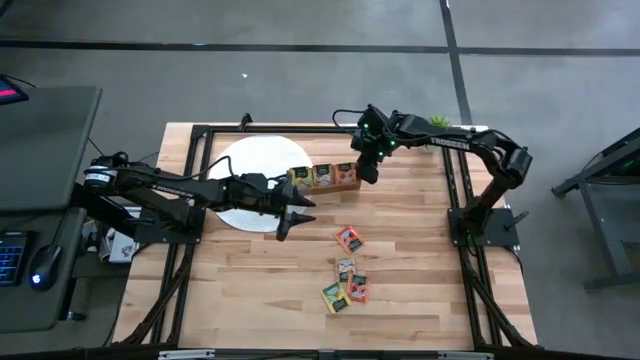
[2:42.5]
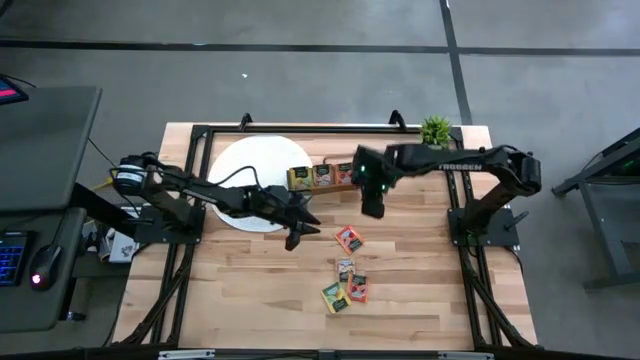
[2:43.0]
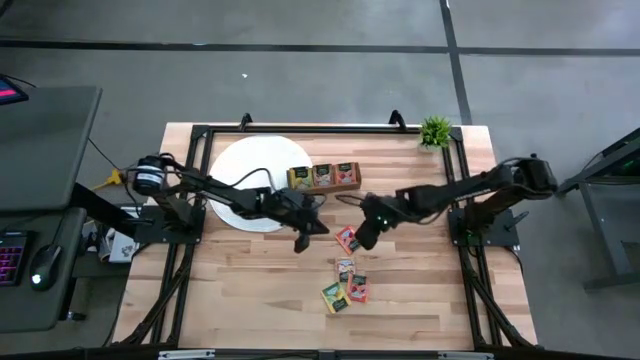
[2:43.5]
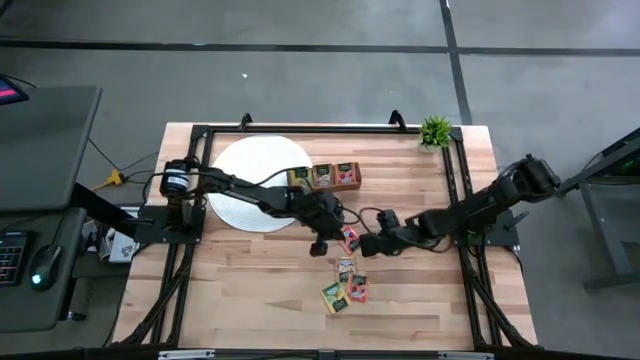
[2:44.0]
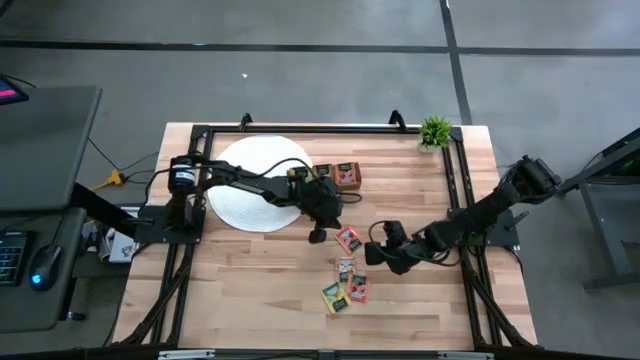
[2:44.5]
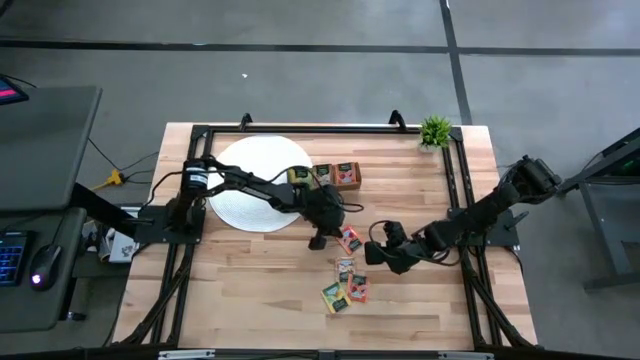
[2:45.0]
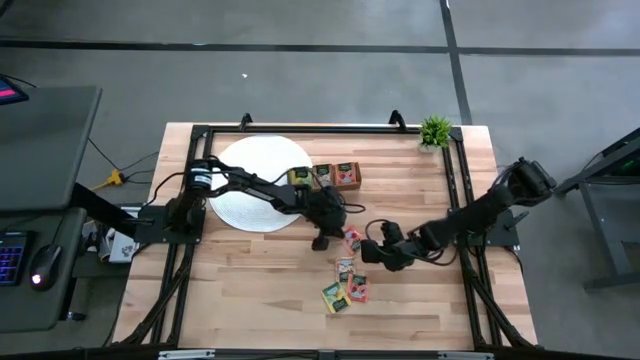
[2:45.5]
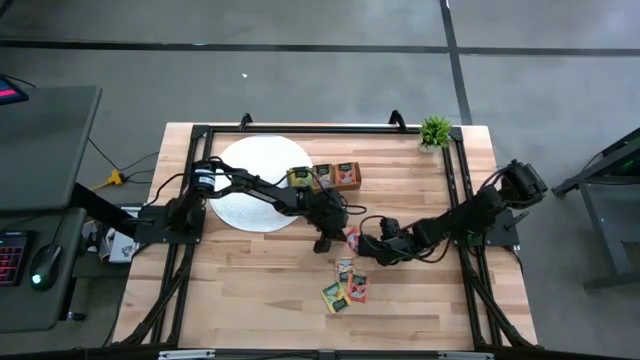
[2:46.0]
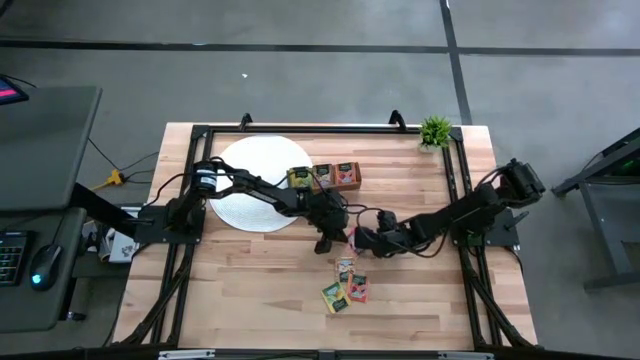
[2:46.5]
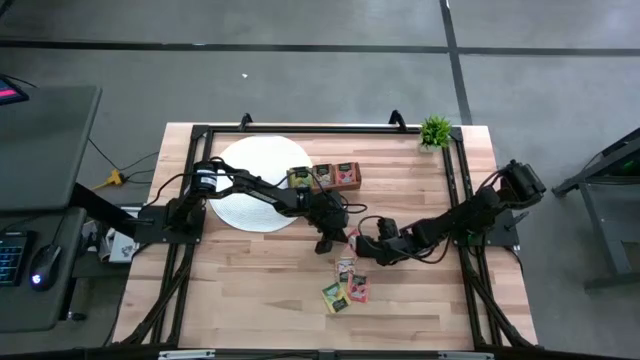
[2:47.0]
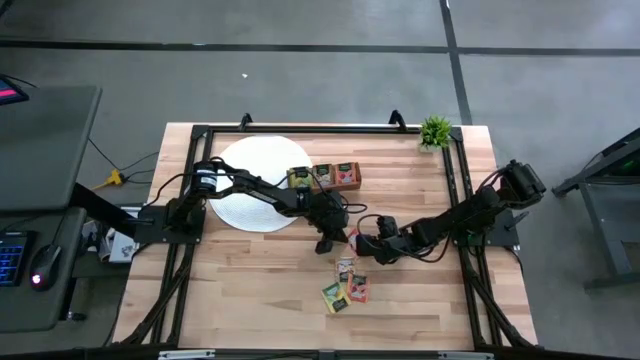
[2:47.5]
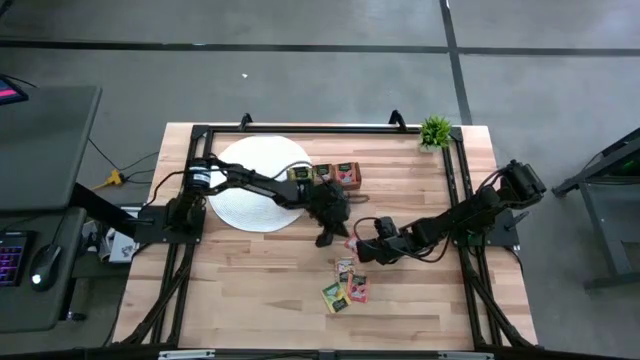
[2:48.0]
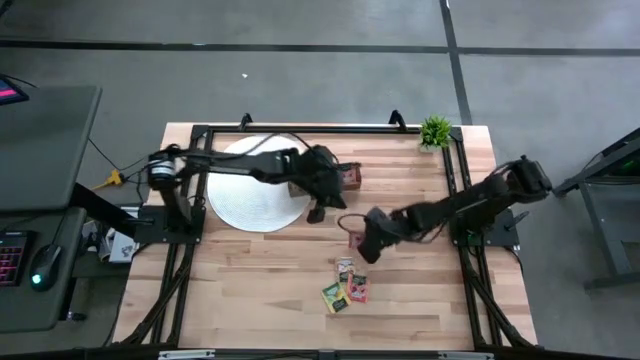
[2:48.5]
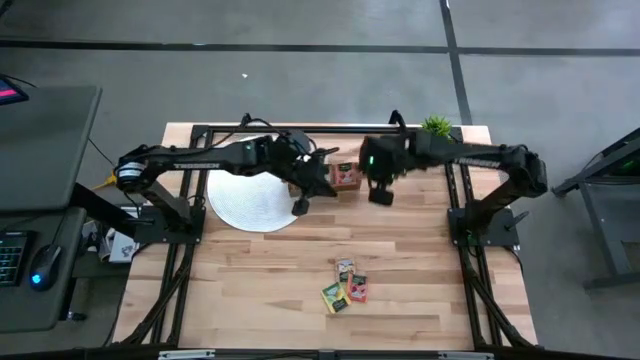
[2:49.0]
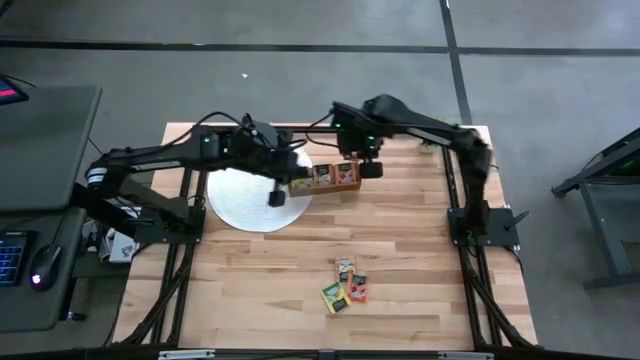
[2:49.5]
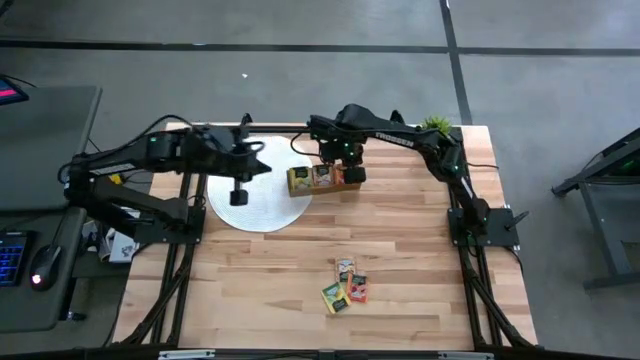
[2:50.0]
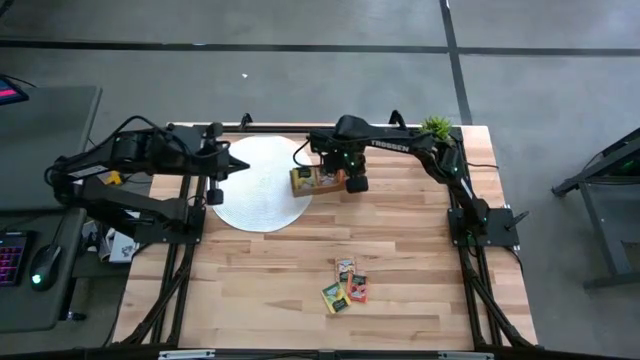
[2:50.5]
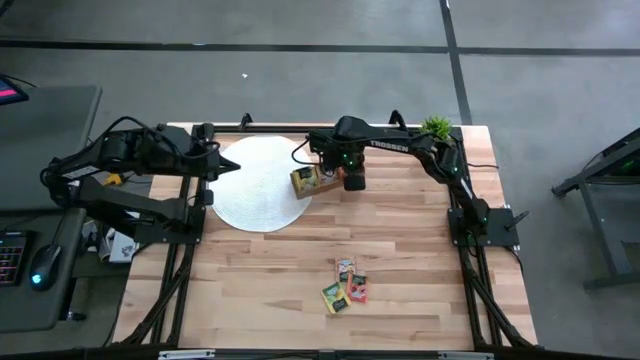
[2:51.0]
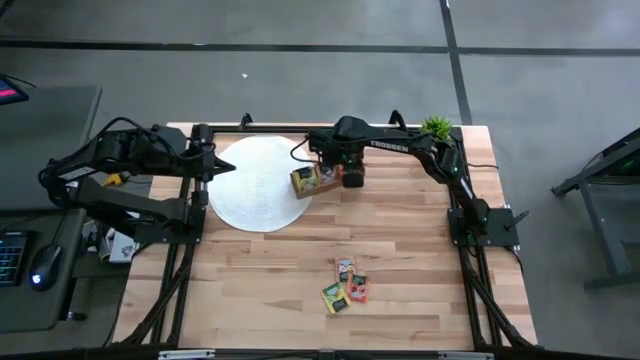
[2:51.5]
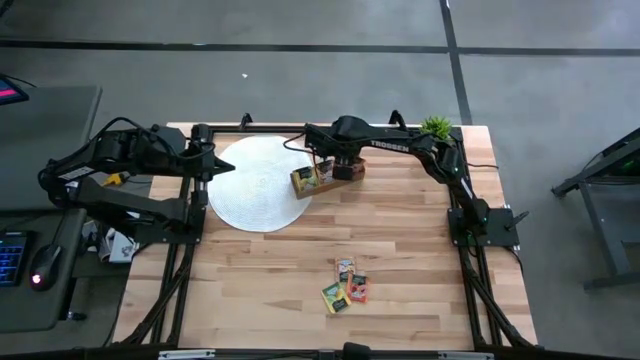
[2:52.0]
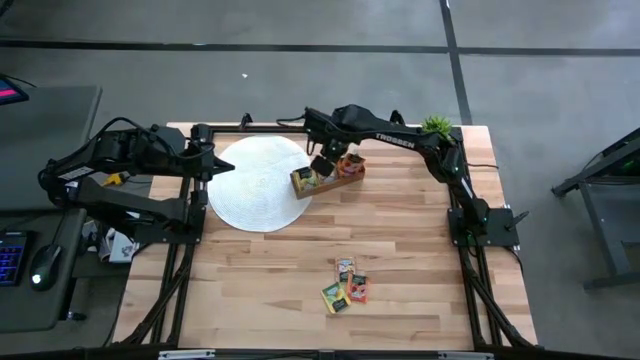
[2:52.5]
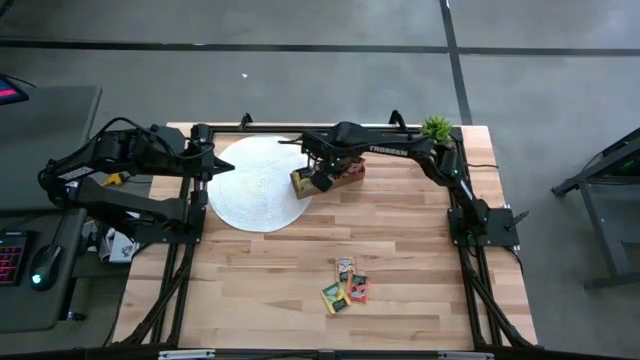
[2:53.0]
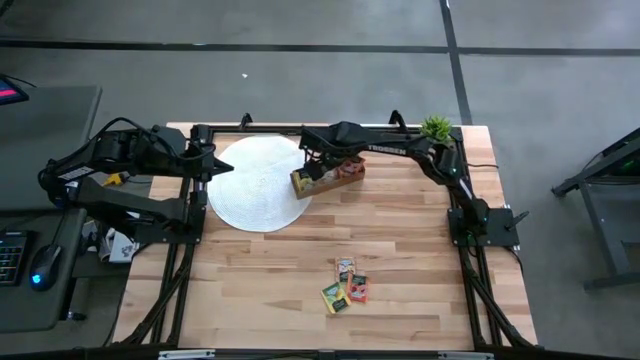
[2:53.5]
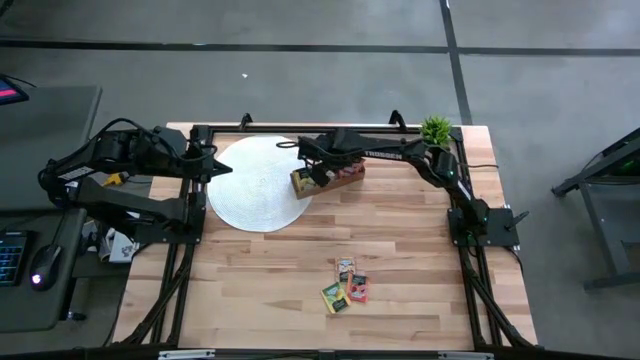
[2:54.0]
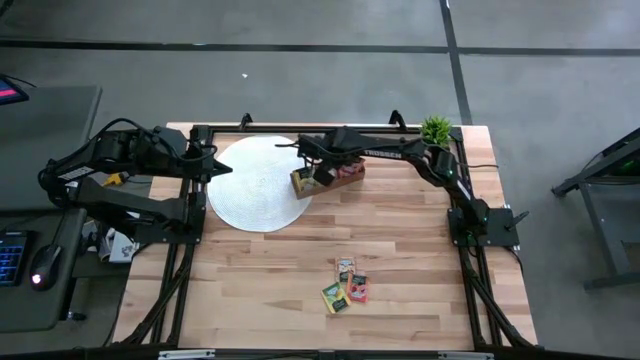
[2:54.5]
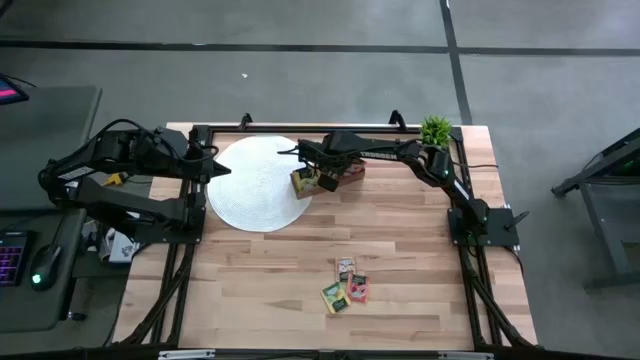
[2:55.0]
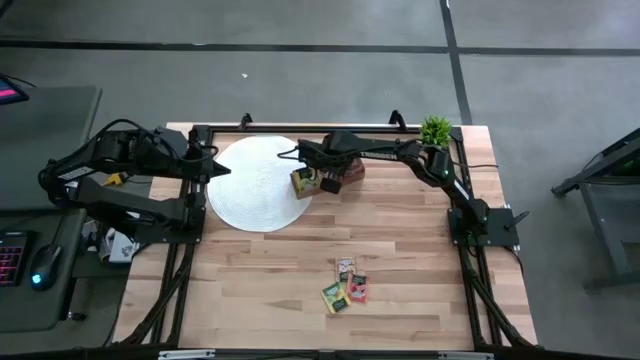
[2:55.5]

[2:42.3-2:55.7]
Task: Pick & Place Tea
Put the orange tea bag into the right compartment of the wooden organizer

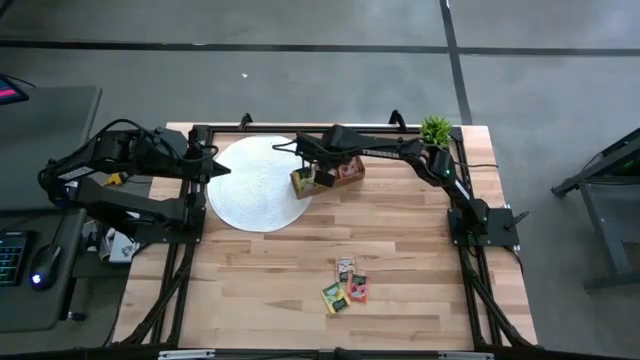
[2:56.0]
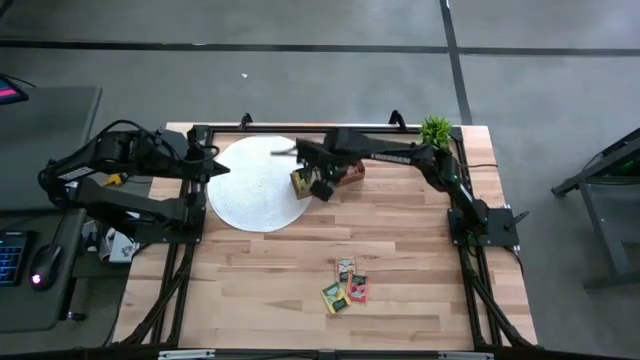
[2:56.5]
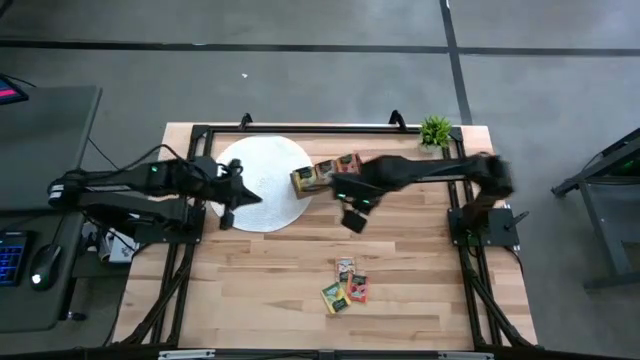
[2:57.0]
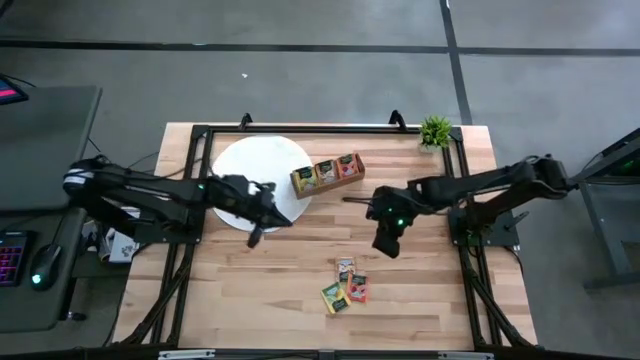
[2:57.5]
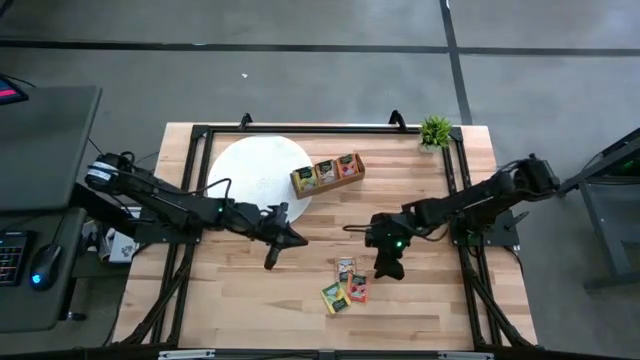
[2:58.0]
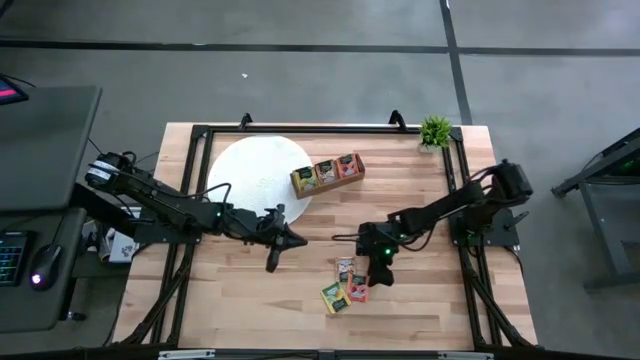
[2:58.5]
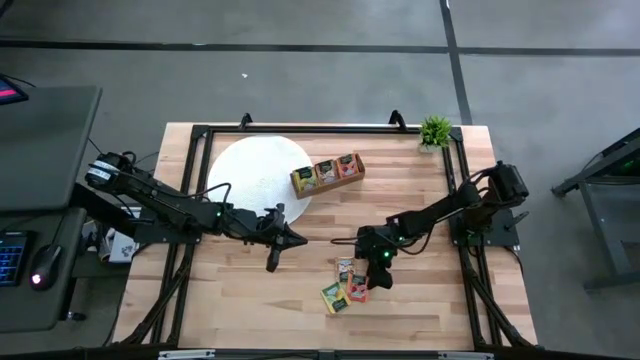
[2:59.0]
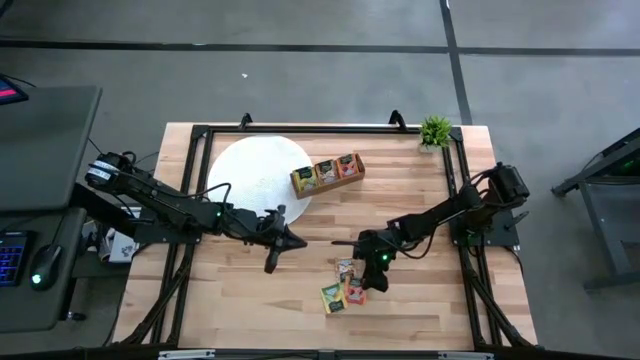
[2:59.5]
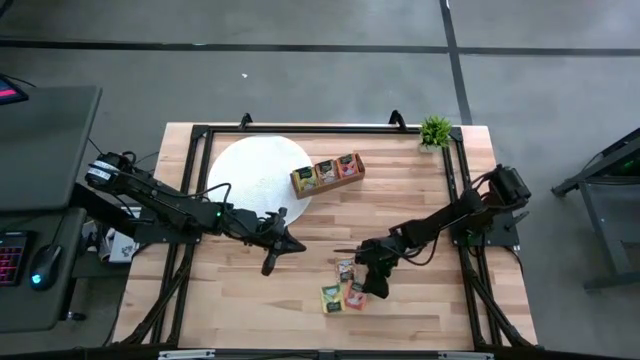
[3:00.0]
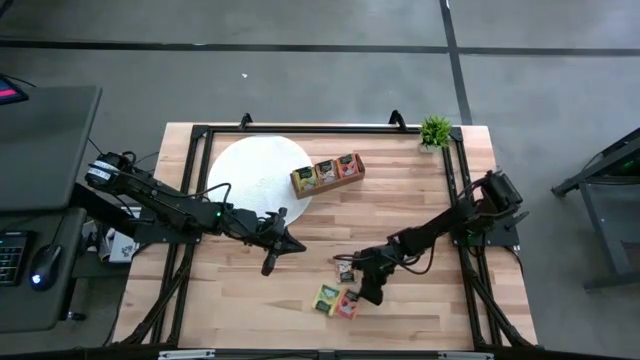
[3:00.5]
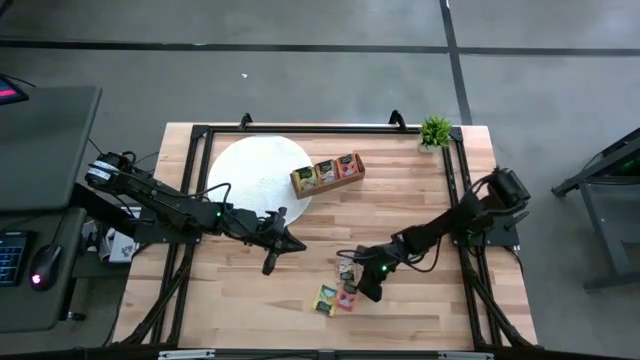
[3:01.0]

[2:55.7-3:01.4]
Put the orange tea bag into the right compartment of the wooden organizer

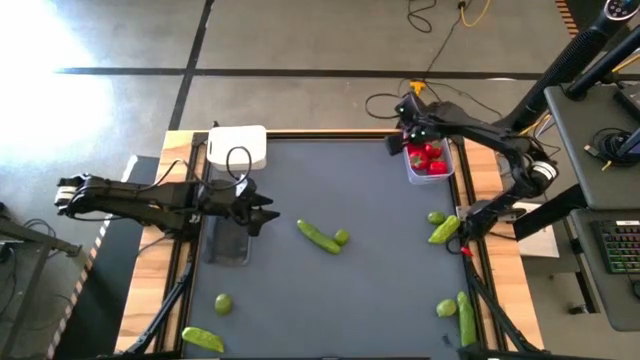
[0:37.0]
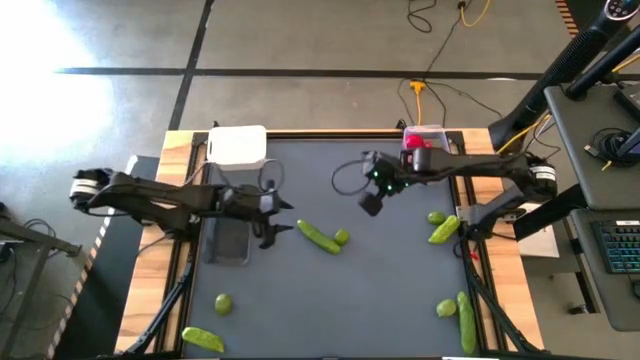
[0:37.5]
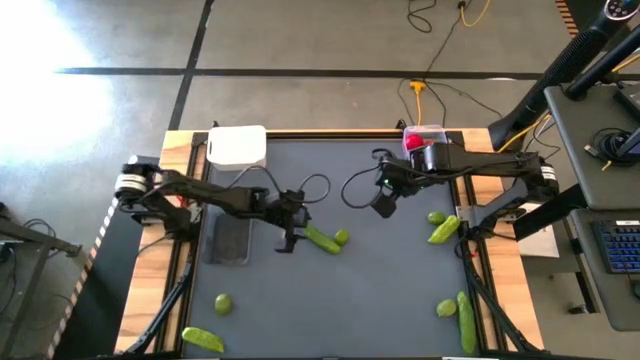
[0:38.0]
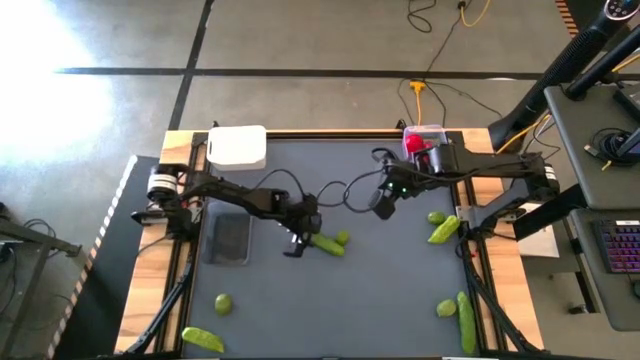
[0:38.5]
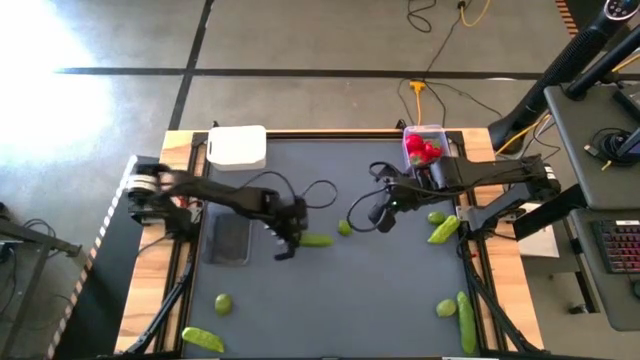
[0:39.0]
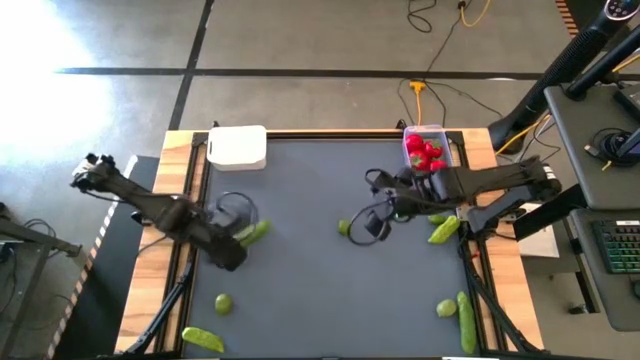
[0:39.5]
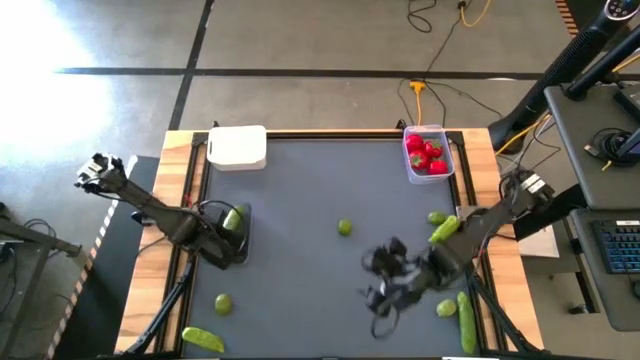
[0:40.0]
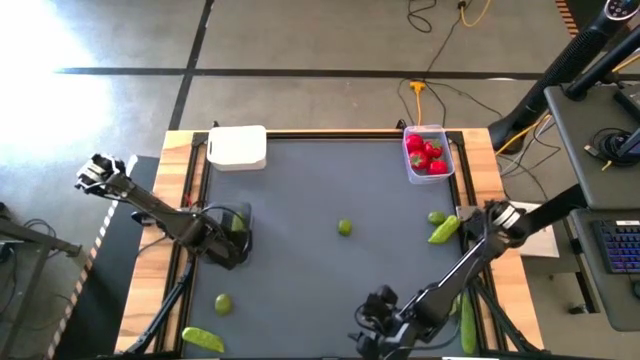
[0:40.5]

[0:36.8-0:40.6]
Task: Sort produce into baskets
Put the green cucumber into the black bin
